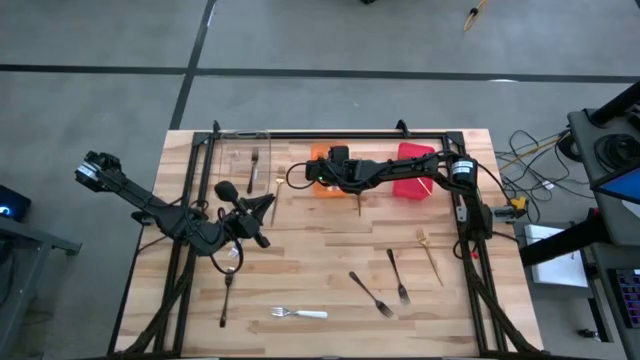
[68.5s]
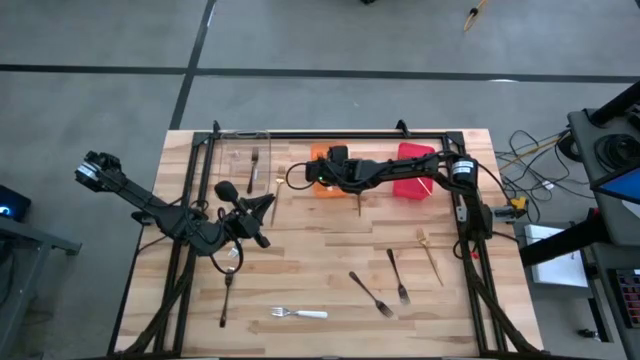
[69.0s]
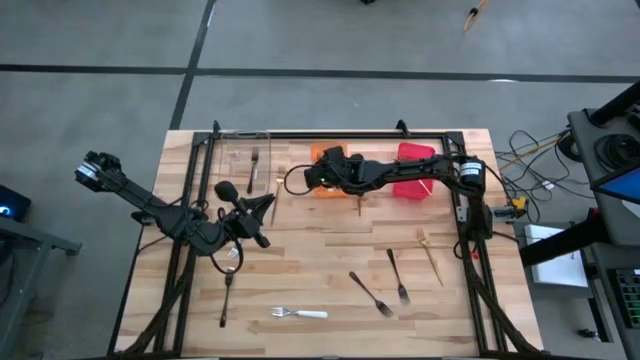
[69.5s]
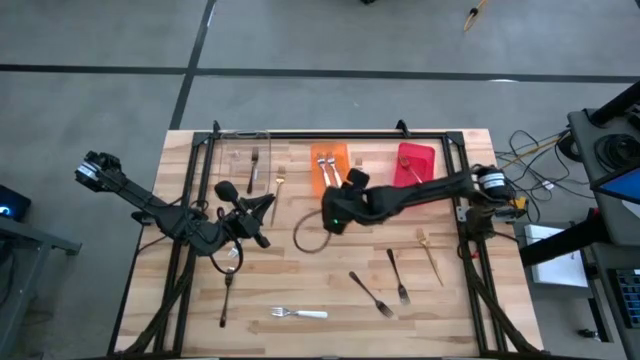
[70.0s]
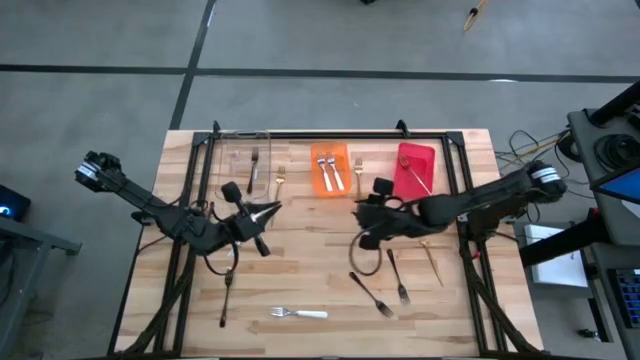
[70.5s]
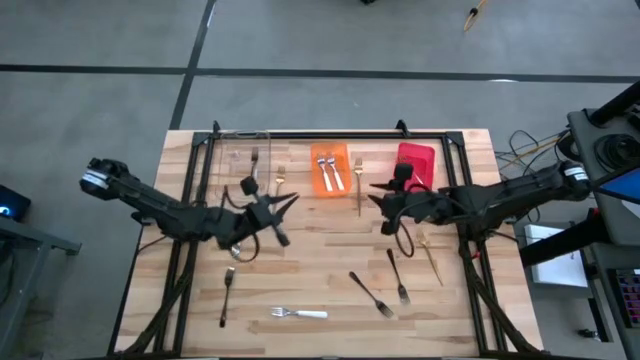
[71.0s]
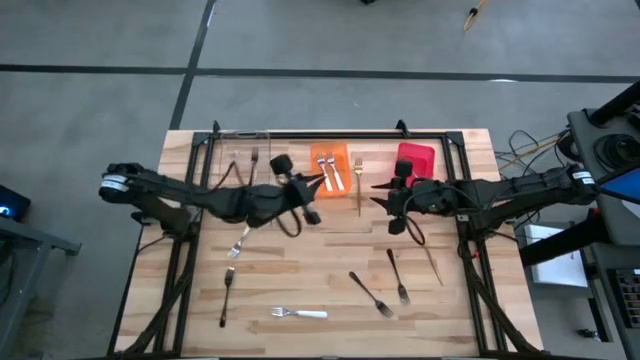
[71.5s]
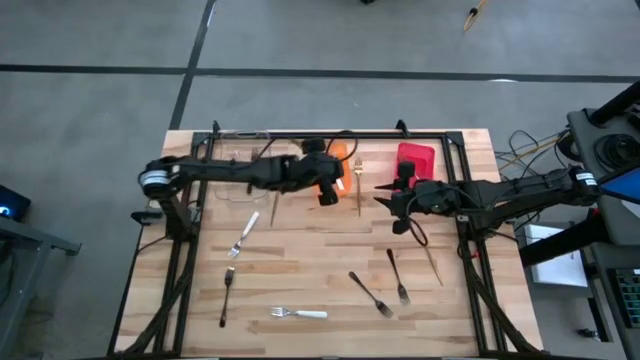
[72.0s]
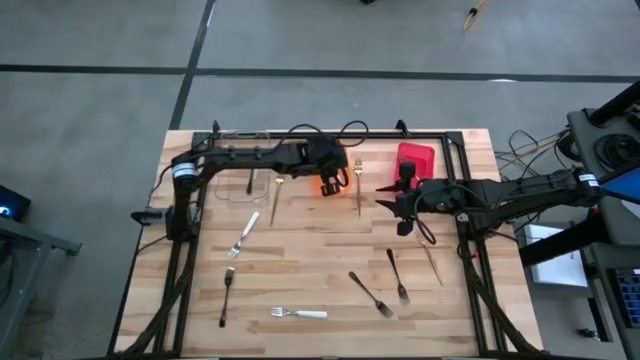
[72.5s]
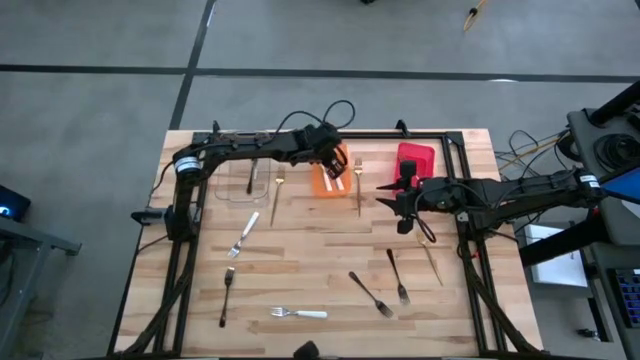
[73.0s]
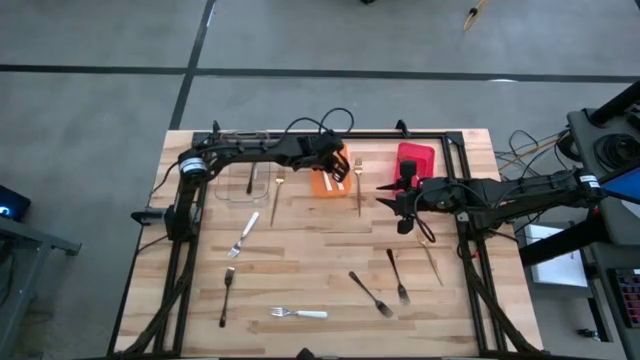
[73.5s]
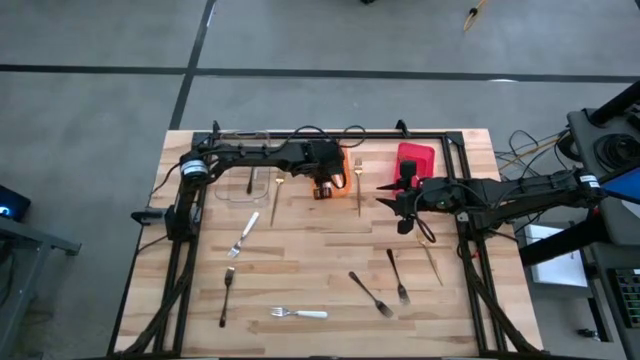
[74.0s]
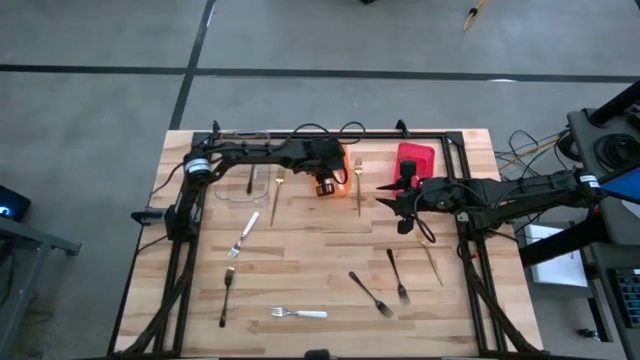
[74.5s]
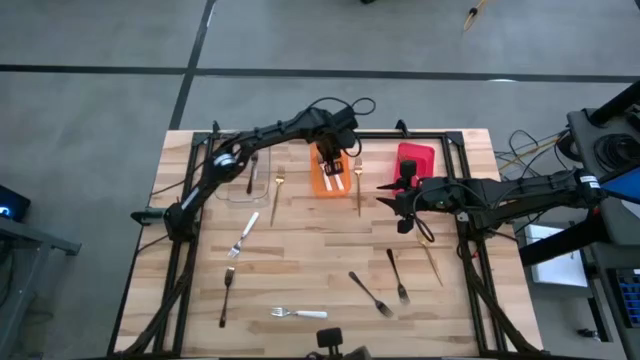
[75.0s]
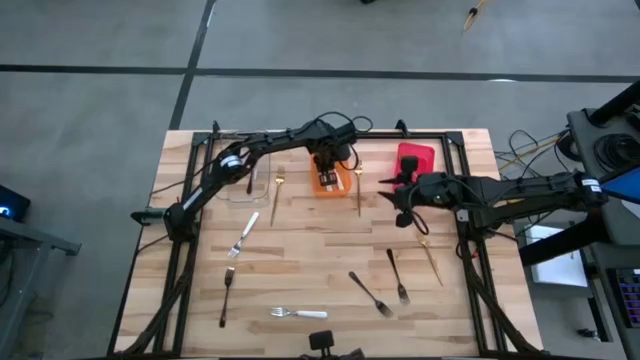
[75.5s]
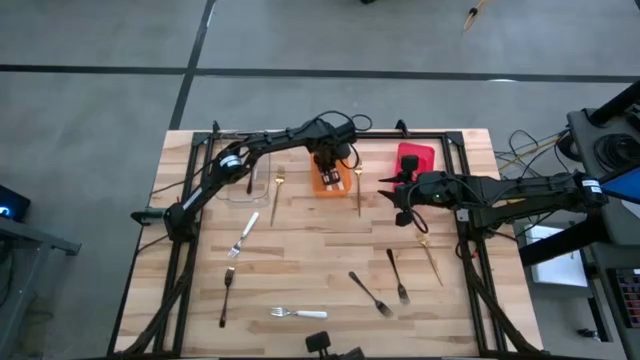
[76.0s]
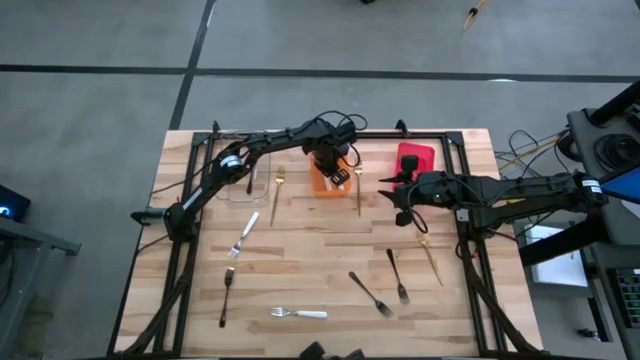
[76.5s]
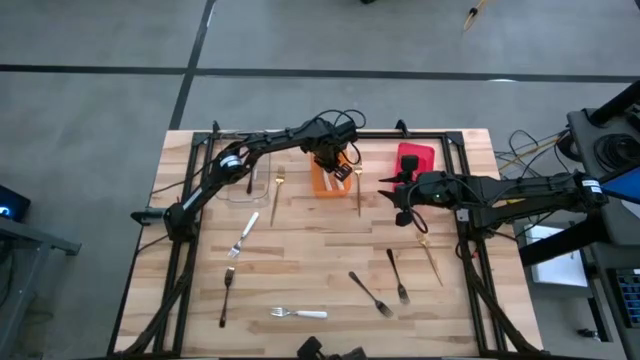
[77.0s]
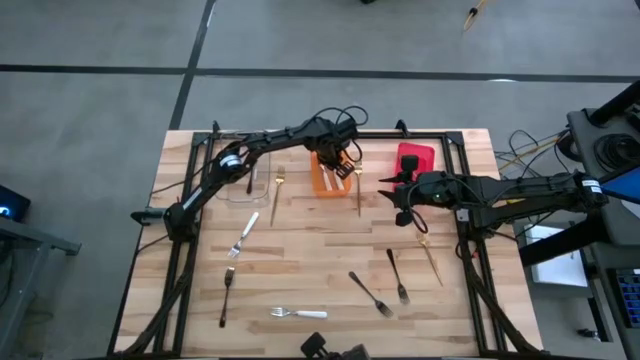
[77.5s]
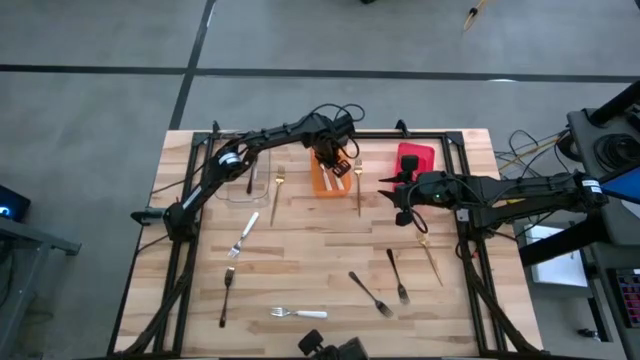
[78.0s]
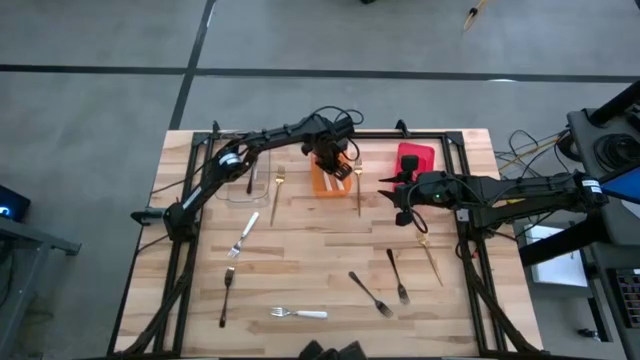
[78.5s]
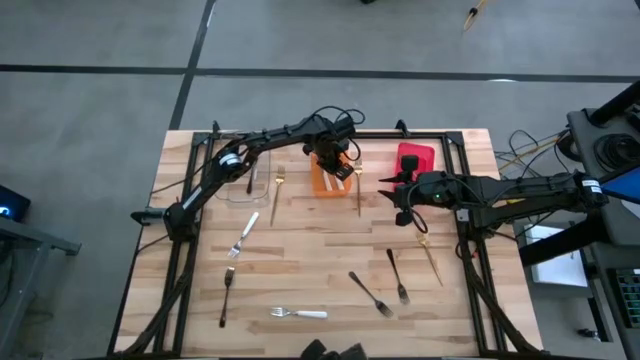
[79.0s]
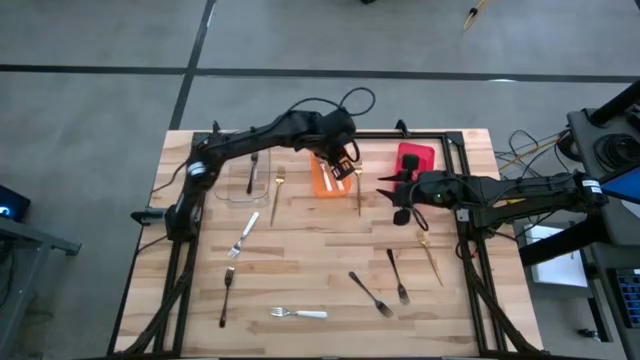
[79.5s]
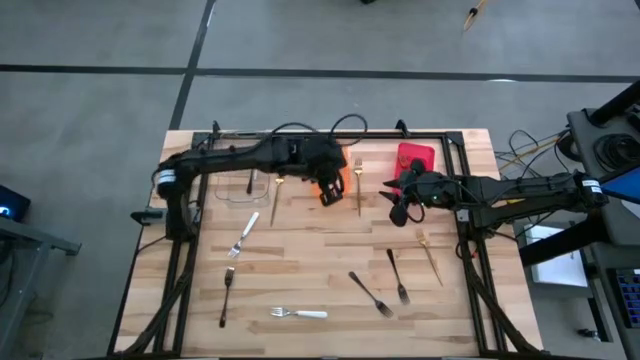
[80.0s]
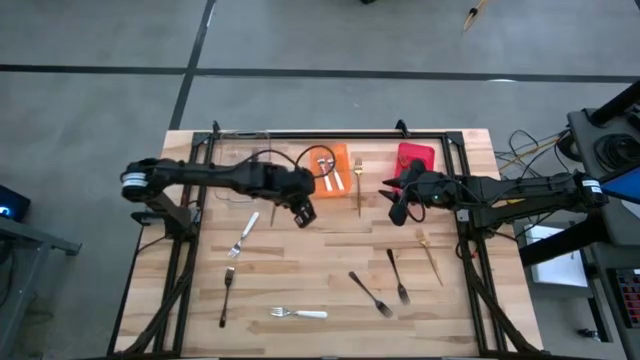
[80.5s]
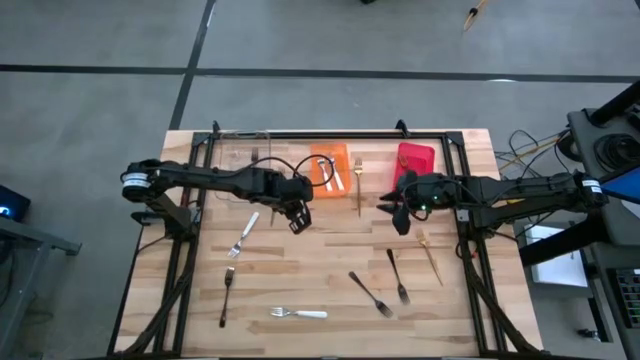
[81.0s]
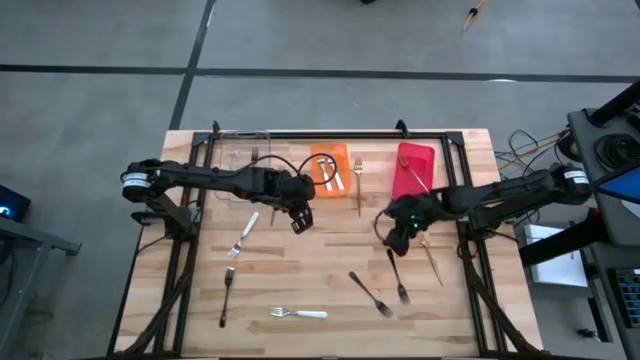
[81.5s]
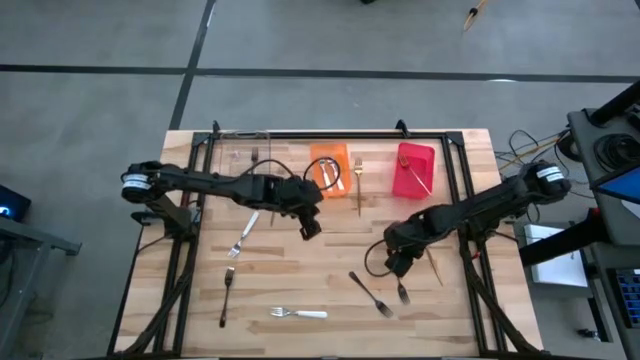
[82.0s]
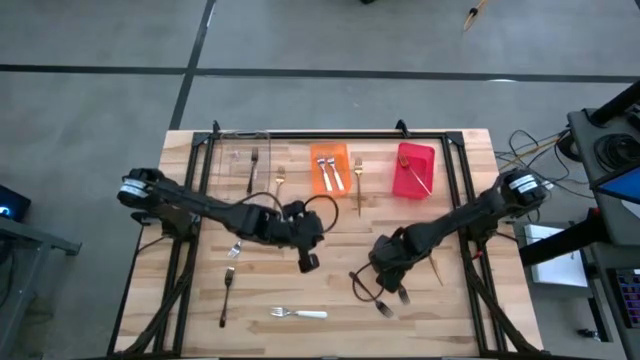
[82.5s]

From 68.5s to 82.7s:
Task: Sort silverware by color (type)
Put the right black fork into the transparent bin

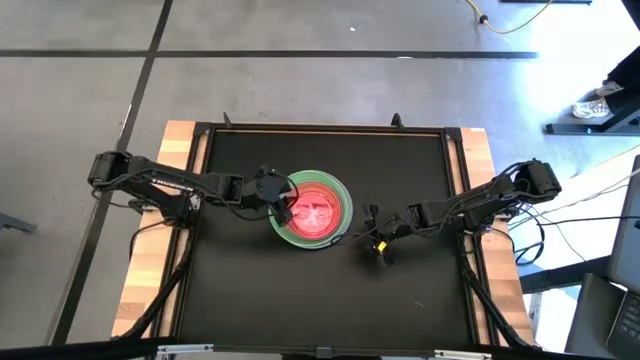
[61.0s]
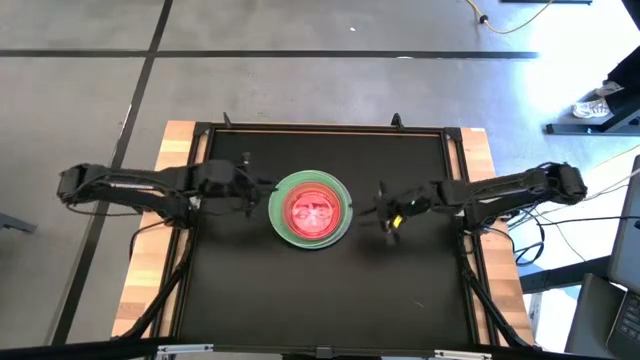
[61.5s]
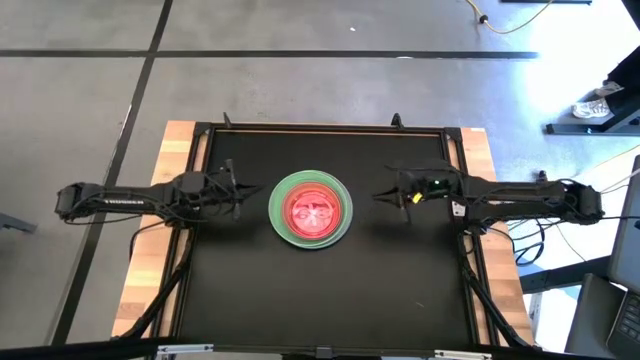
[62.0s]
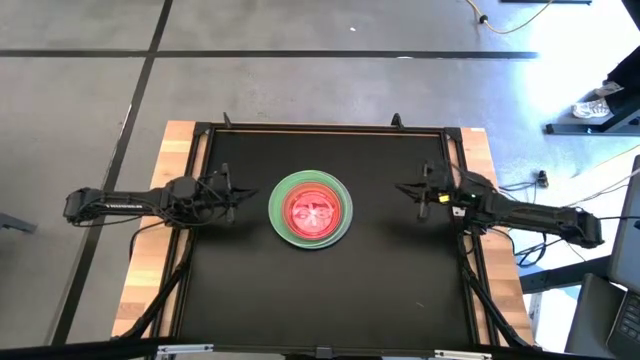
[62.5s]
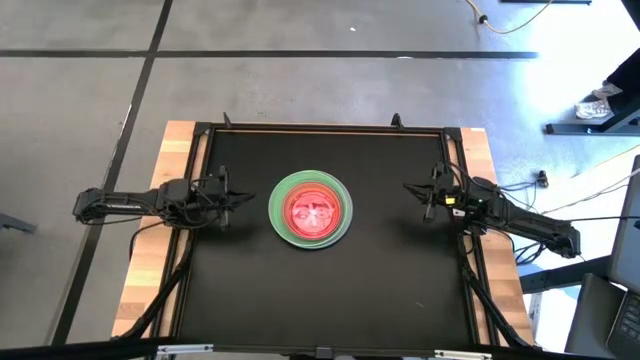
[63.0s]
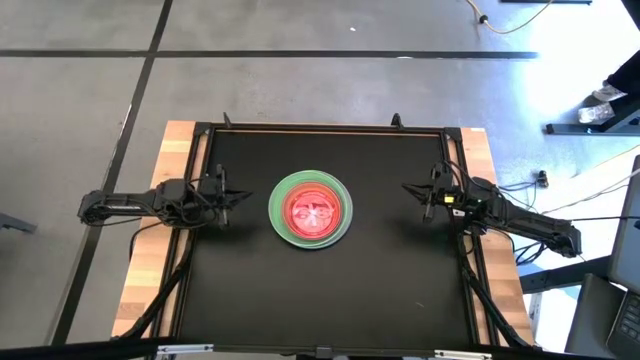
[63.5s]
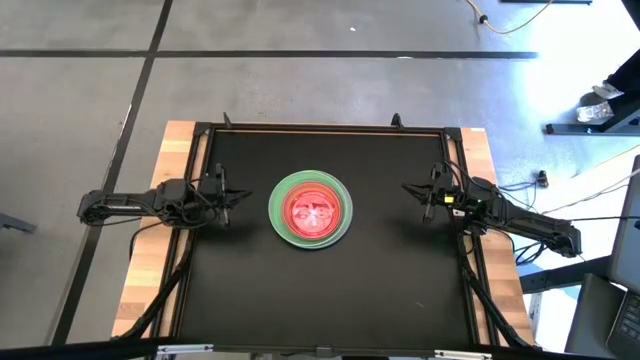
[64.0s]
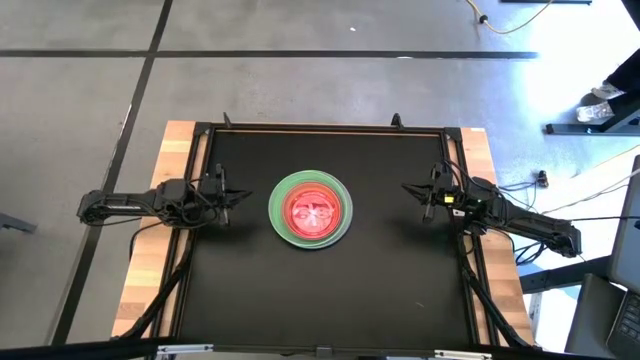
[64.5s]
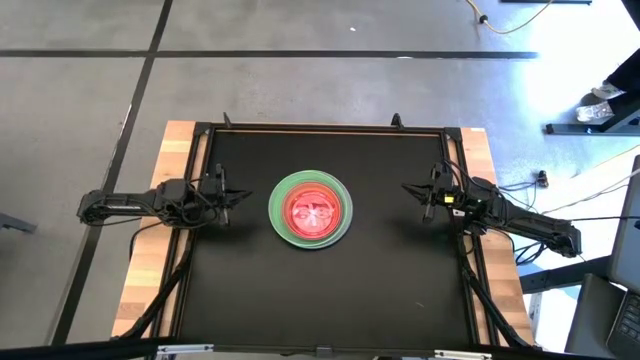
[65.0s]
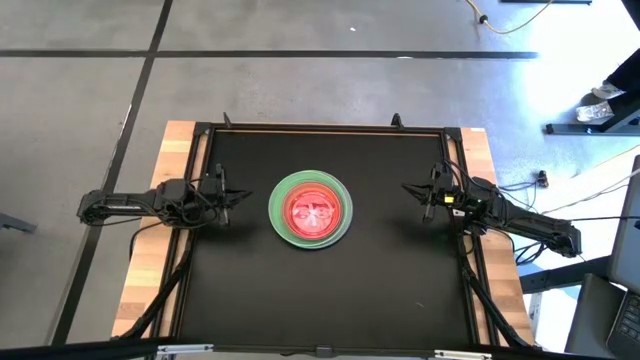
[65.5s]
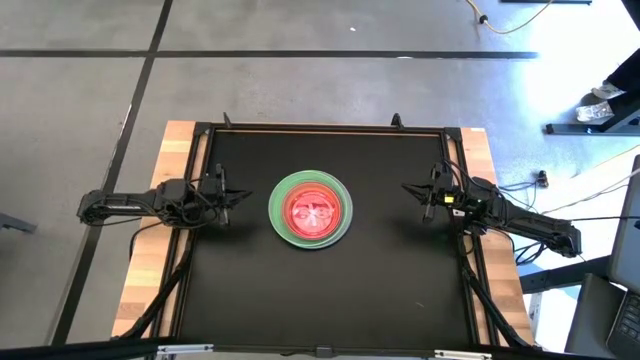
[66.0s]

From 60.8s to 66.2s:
Task: Stack plastic plates
Return to Home Position
